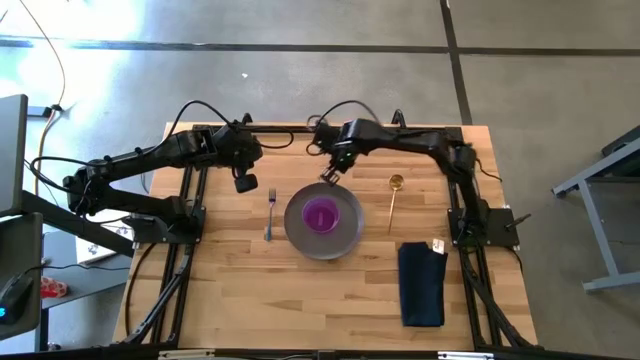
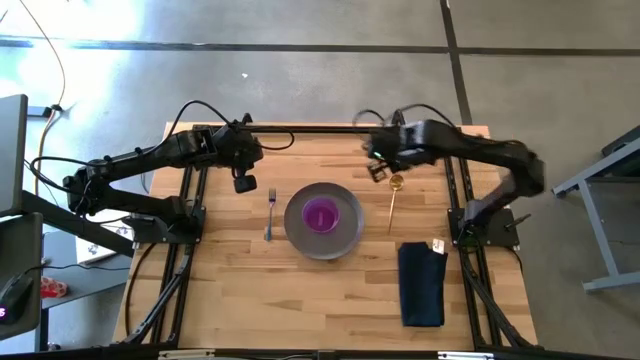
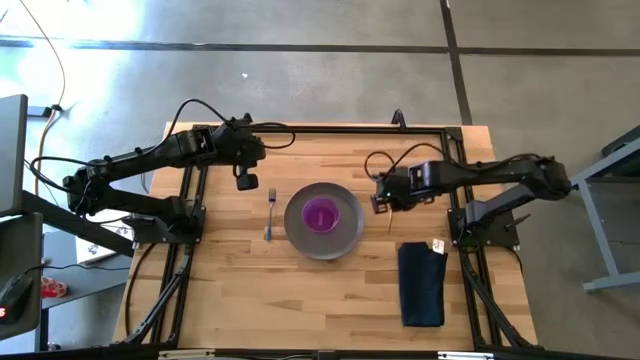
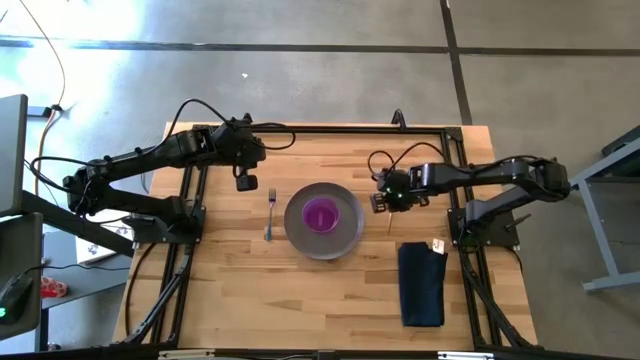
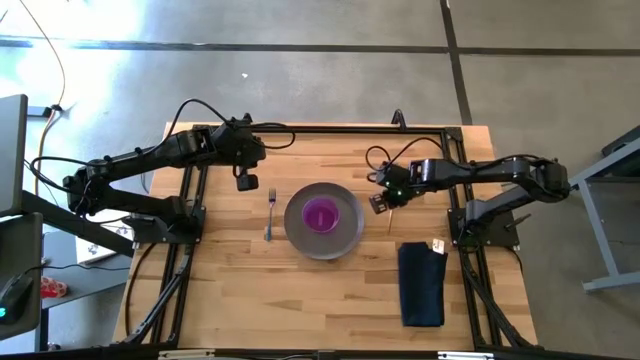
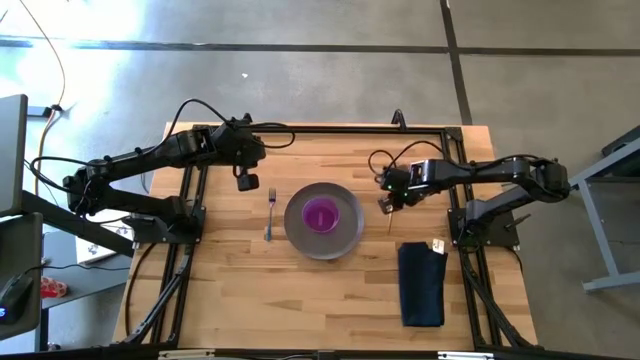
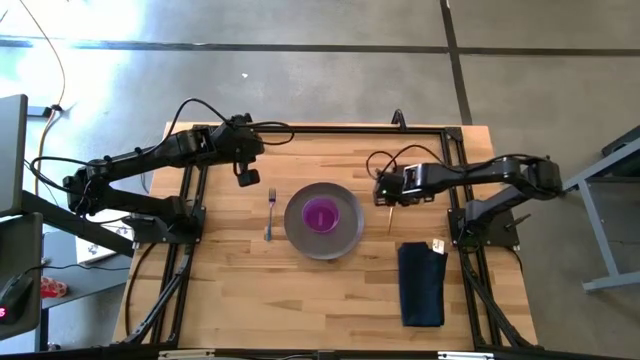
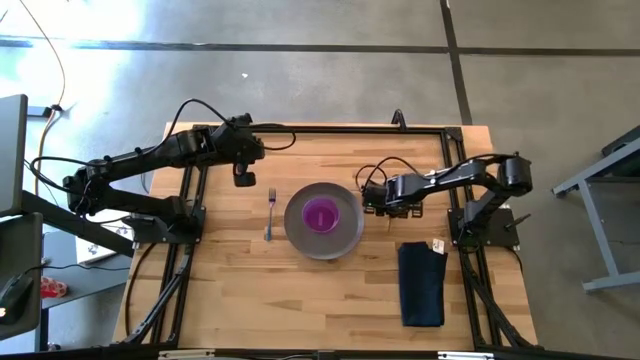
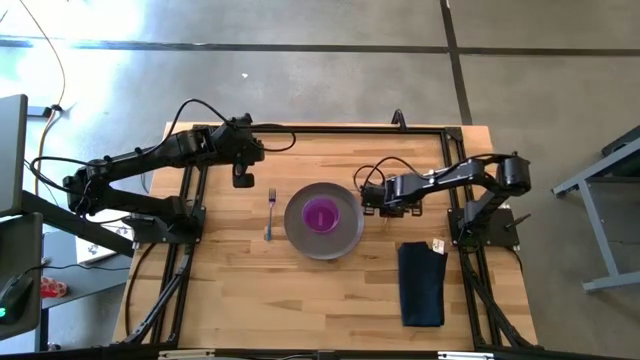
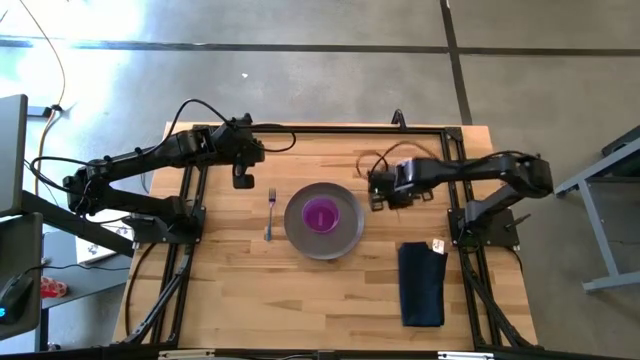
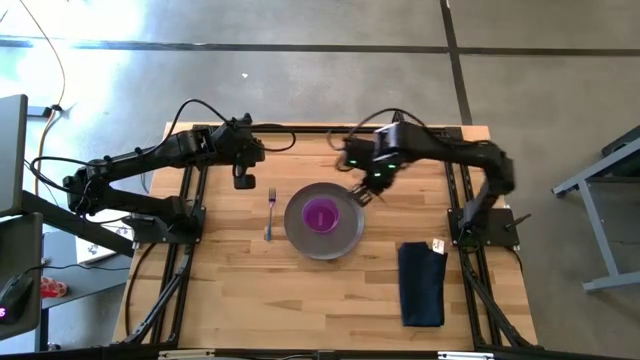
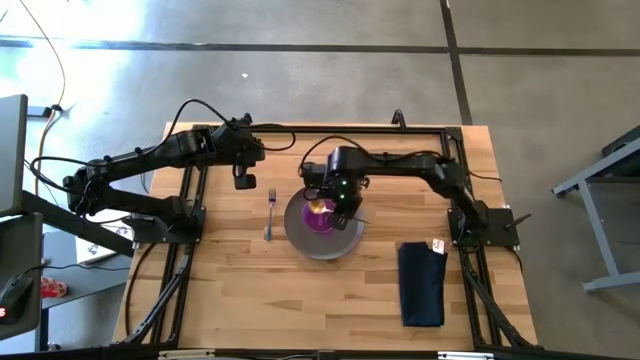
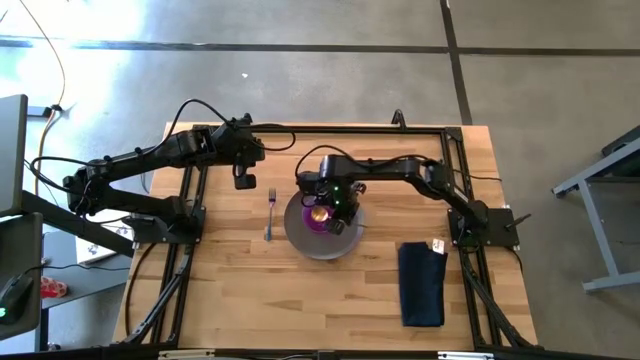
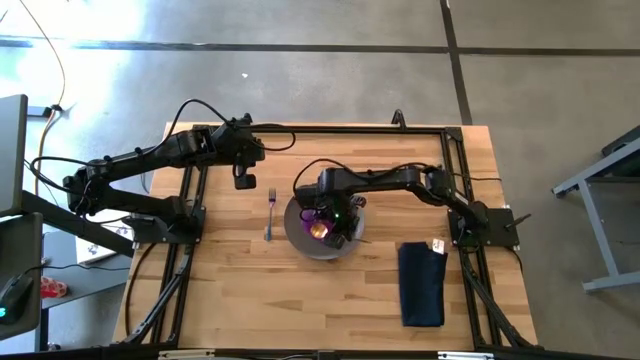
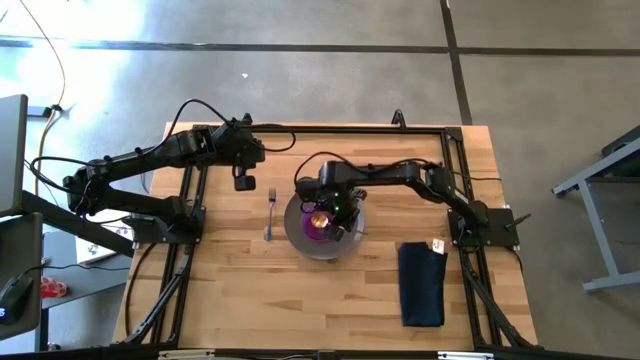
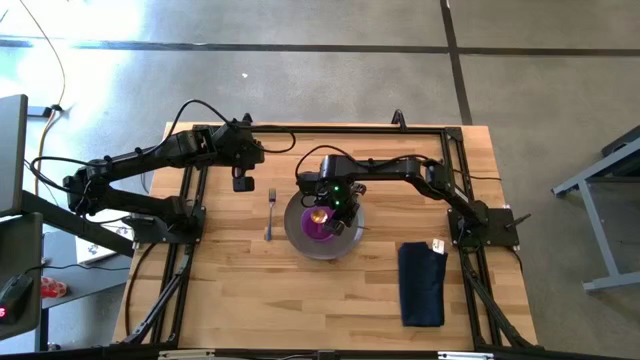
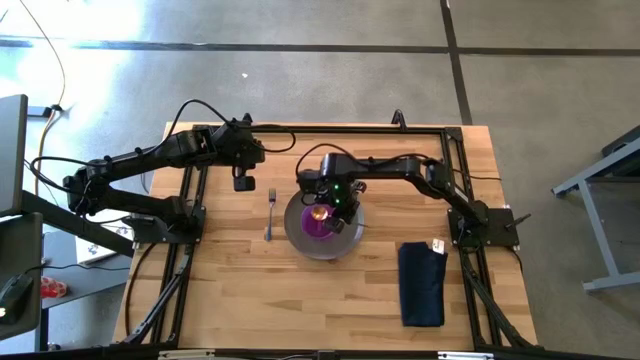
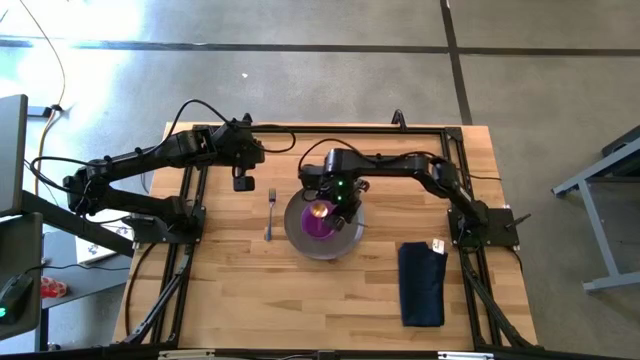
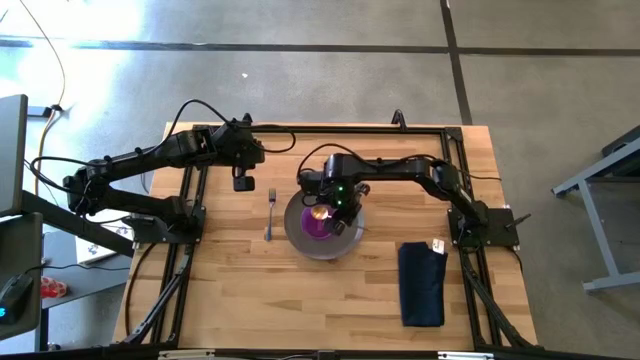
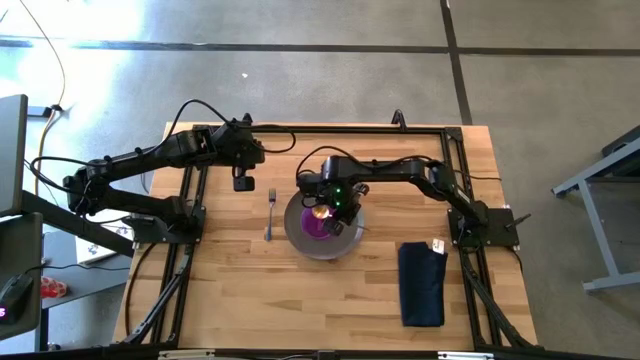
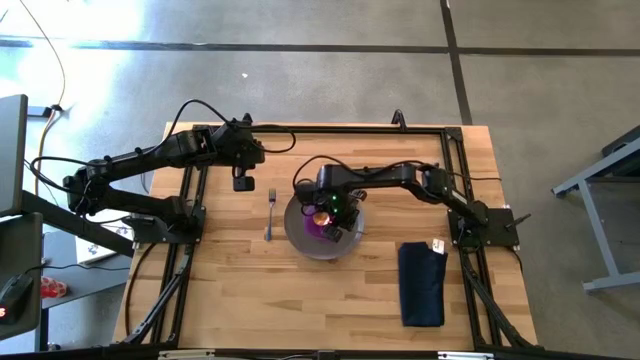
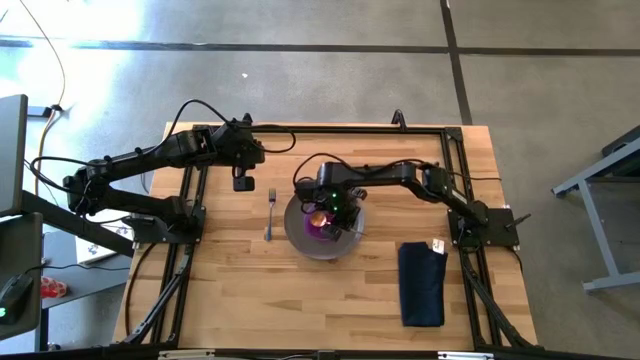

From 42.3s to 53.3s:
Task: Set table place
Put the spoon into the purple bowl

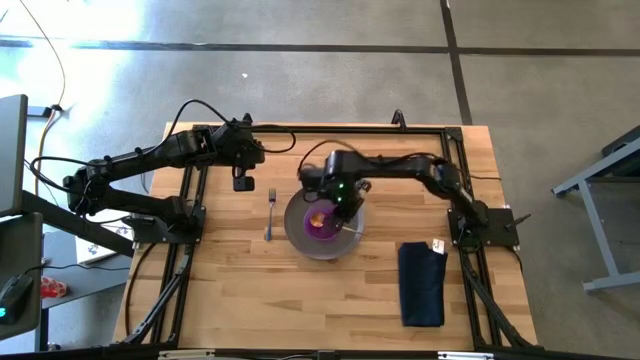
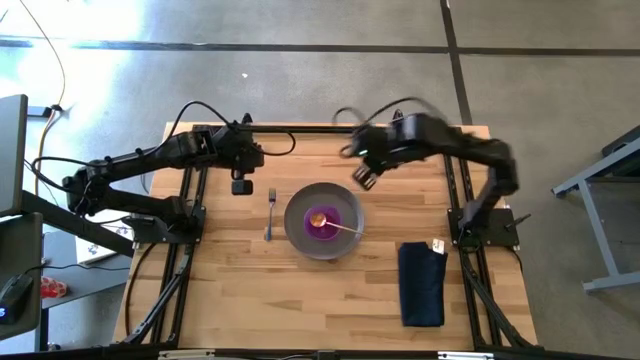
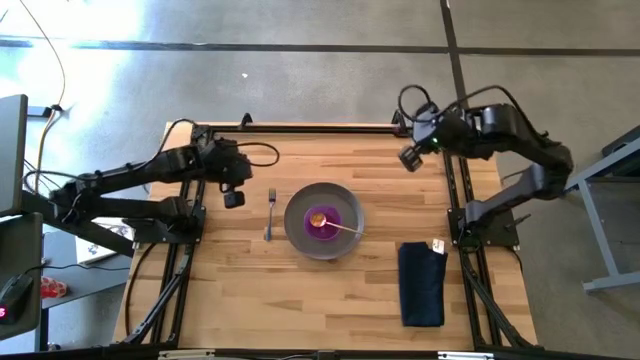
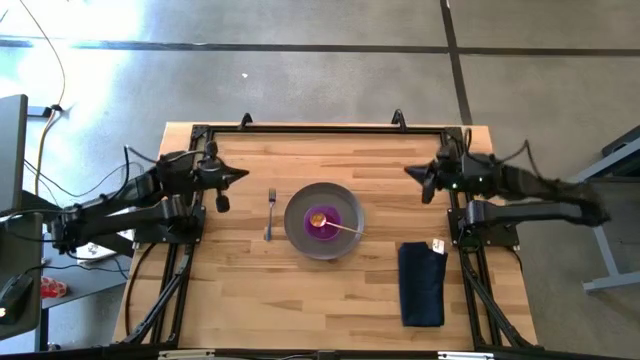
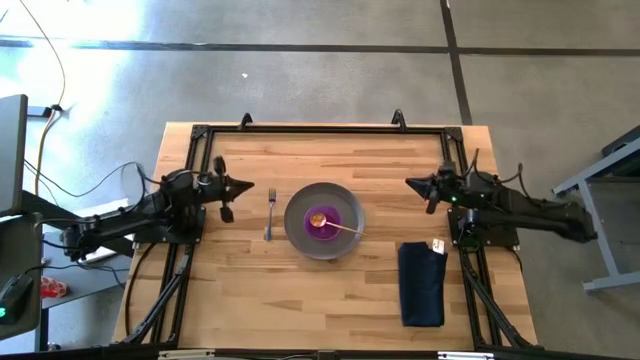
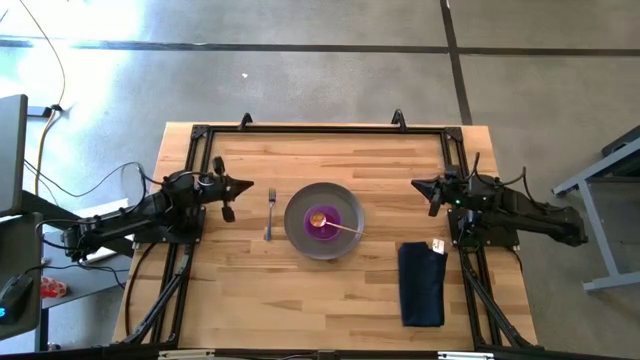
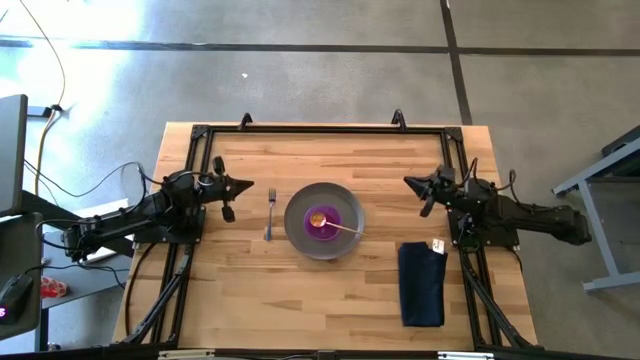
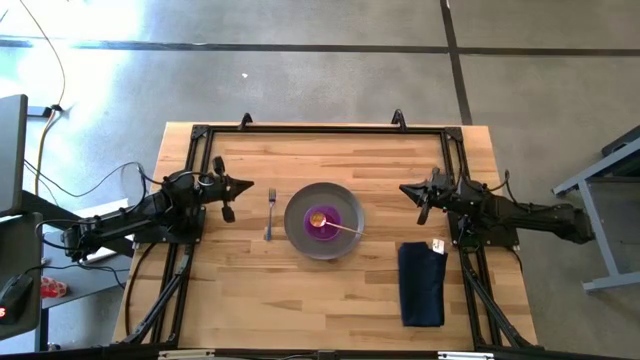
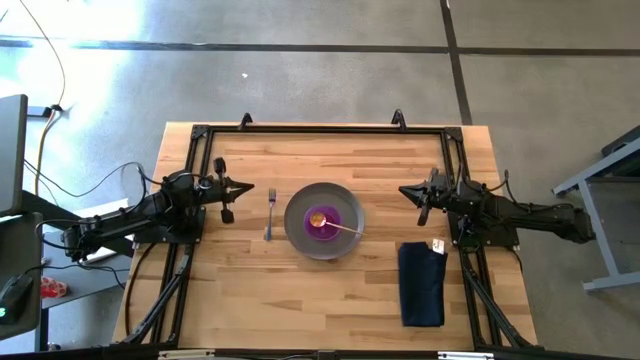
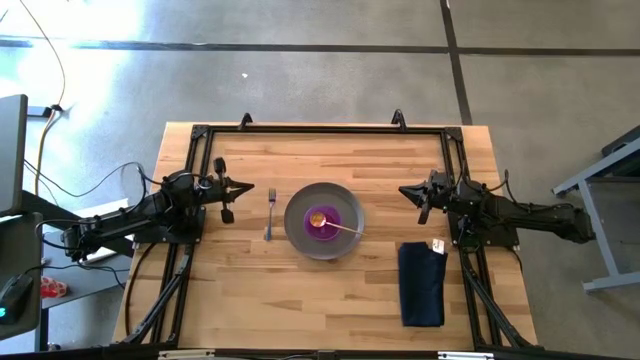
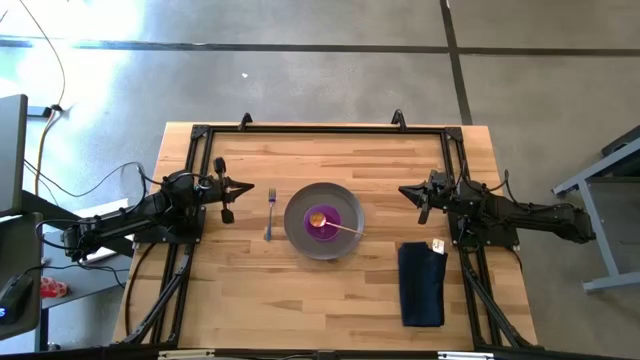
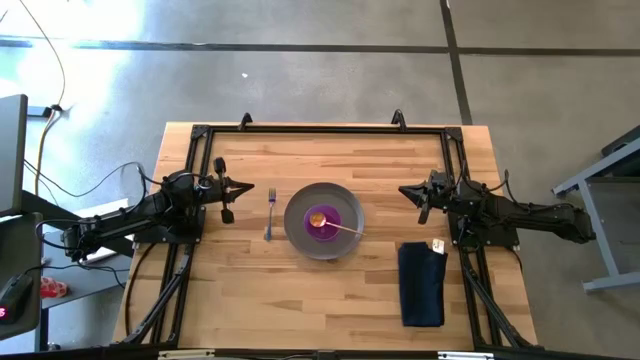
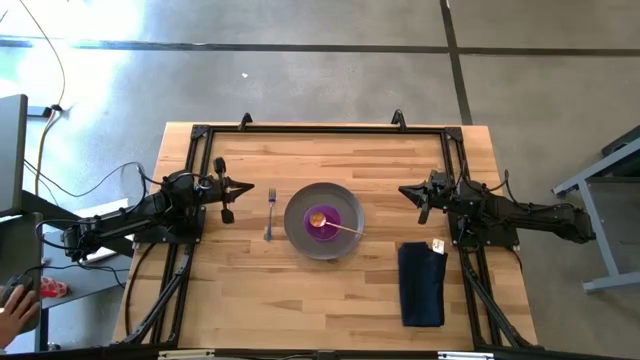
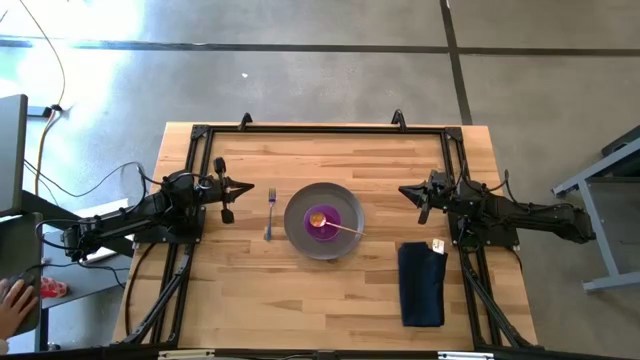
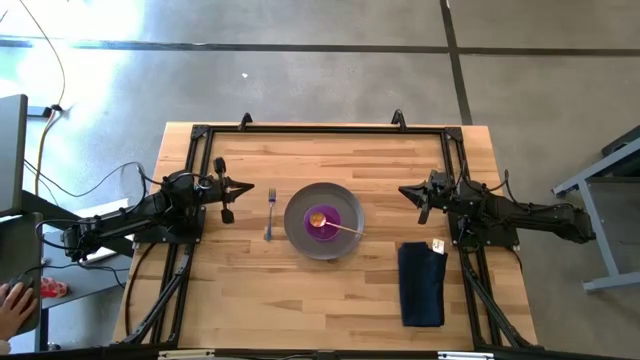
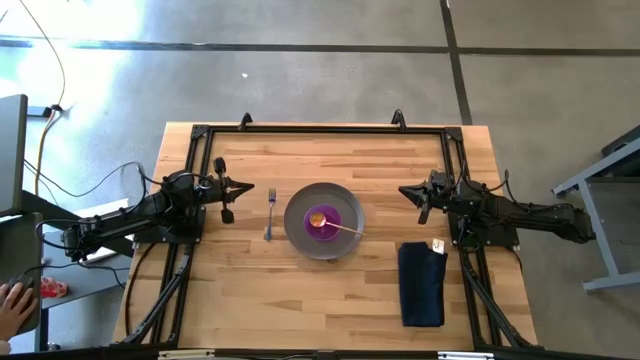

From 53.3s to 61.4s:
Return to Home Position

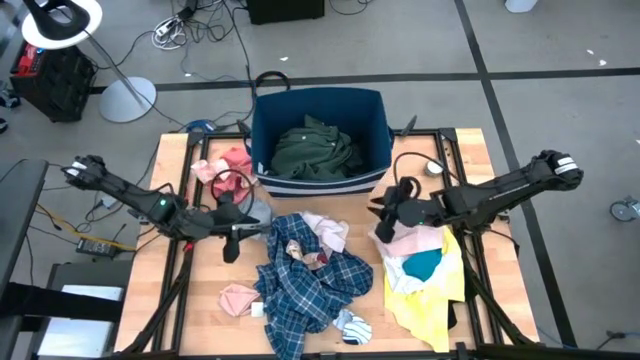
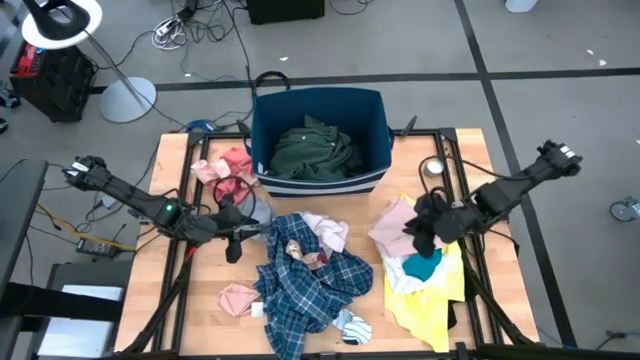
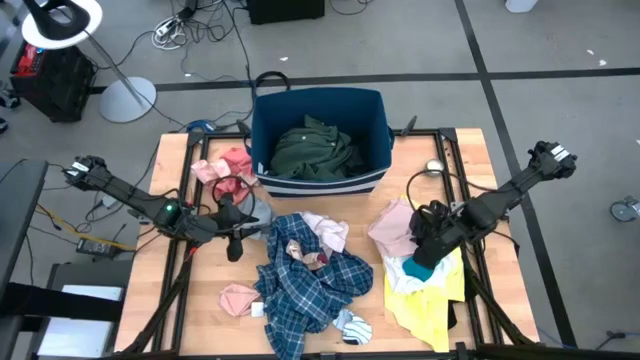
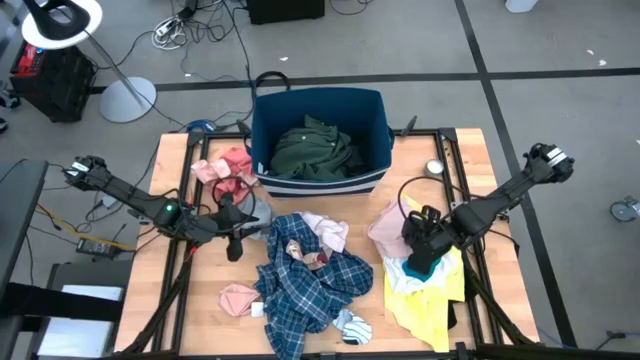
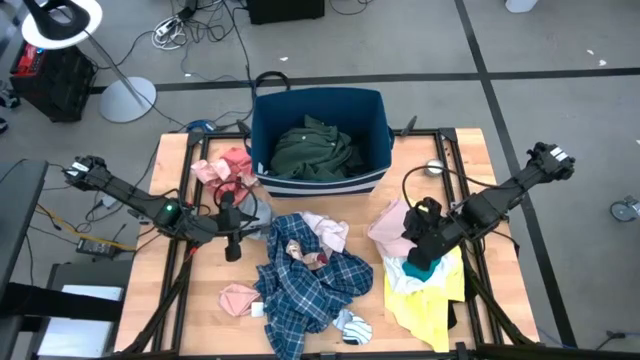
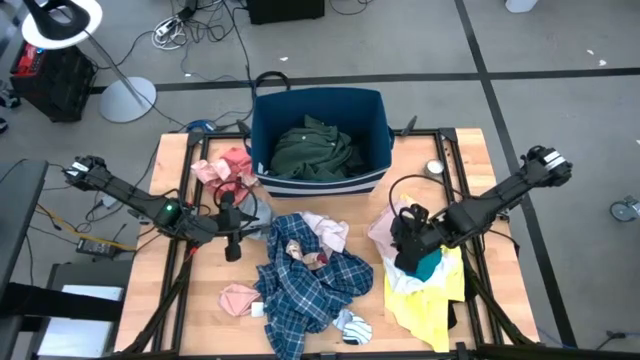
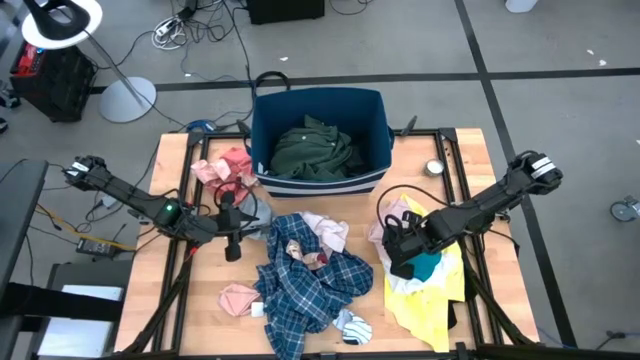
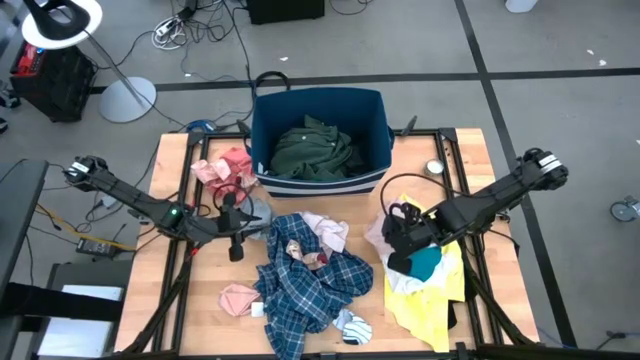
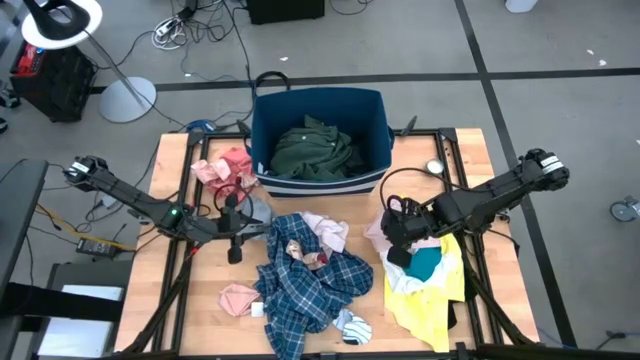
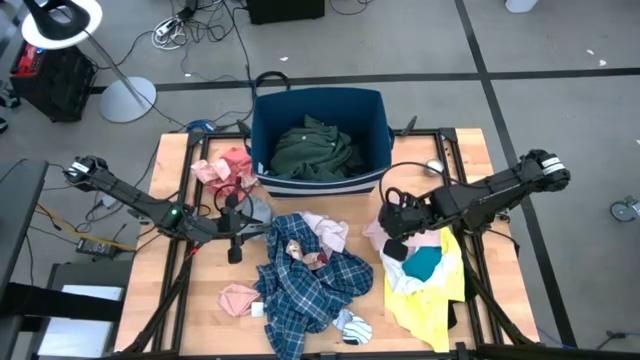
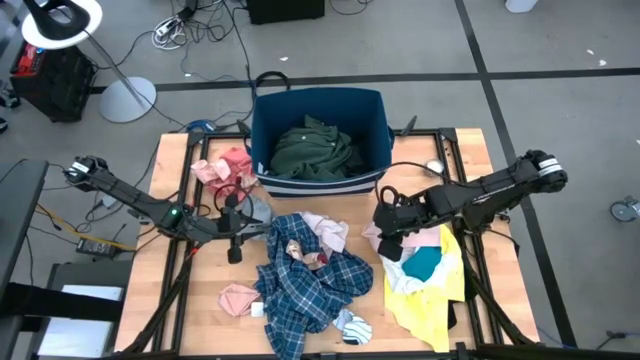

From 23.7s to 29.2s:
Task: Sort clothes
Put the pink underwear into the blue bin
